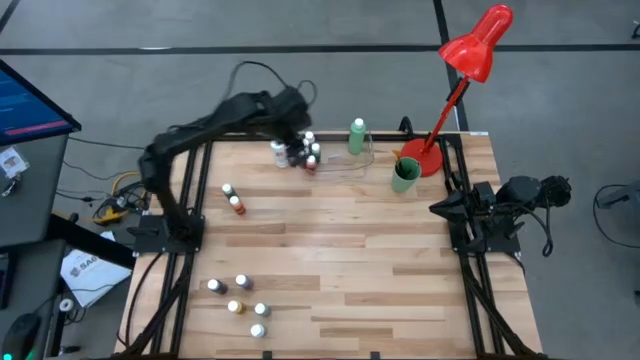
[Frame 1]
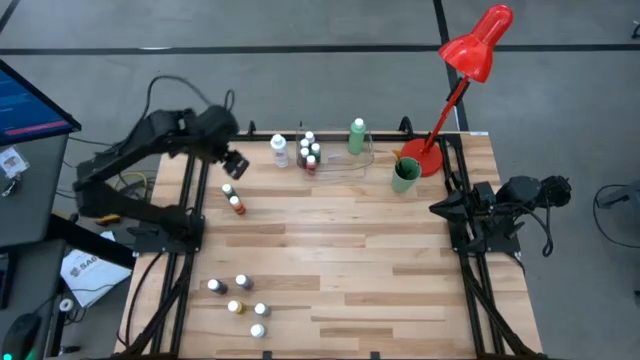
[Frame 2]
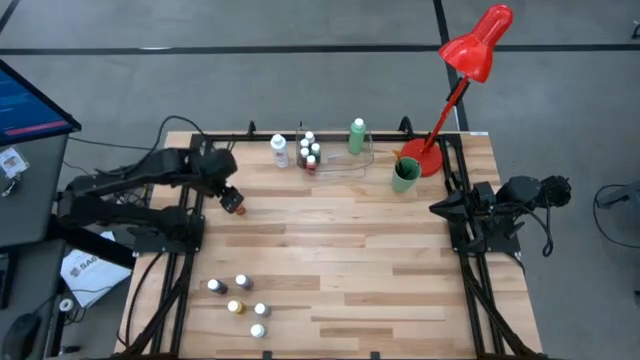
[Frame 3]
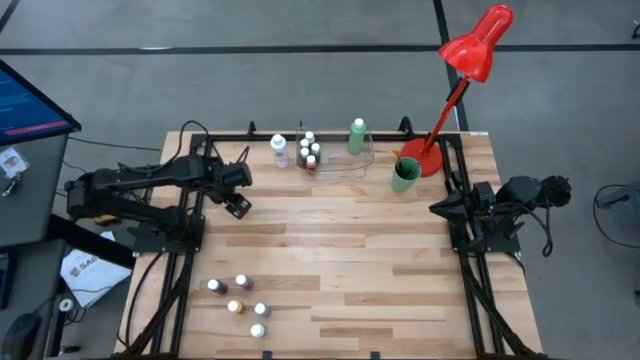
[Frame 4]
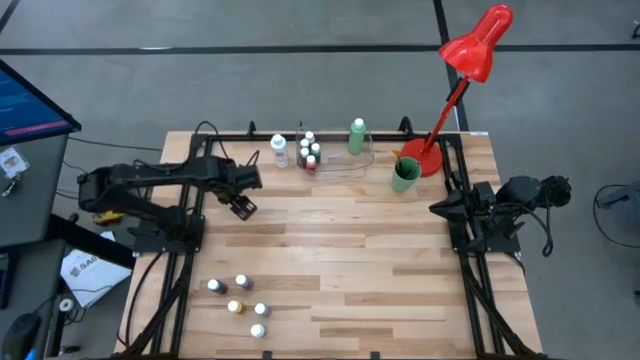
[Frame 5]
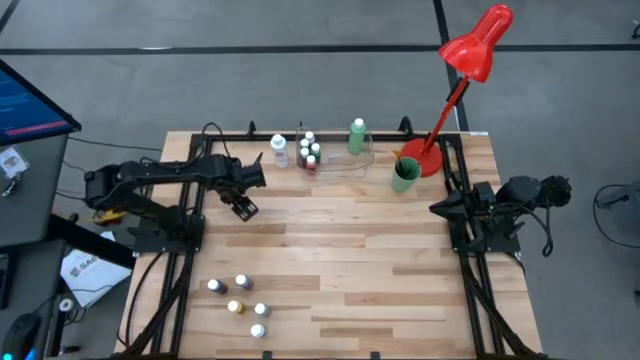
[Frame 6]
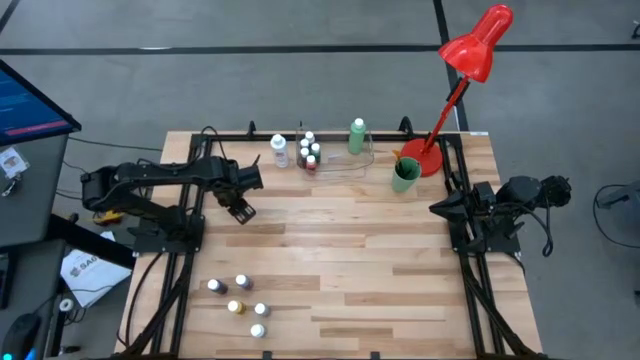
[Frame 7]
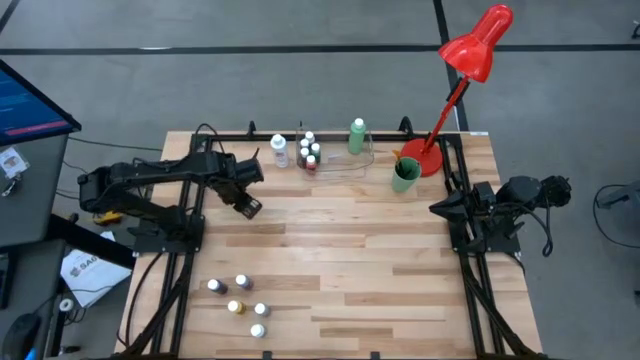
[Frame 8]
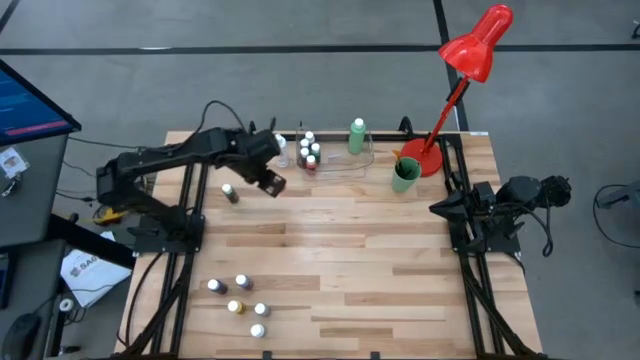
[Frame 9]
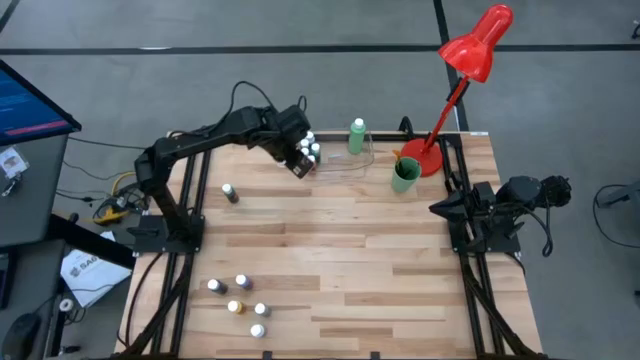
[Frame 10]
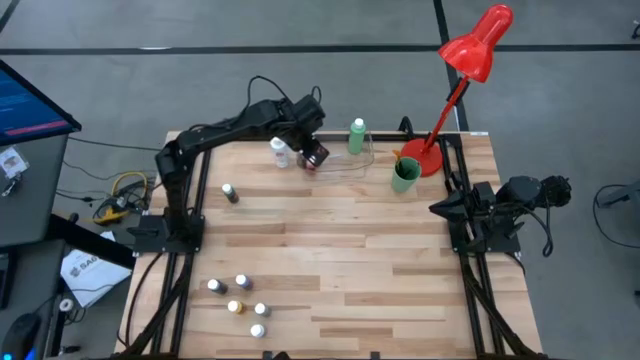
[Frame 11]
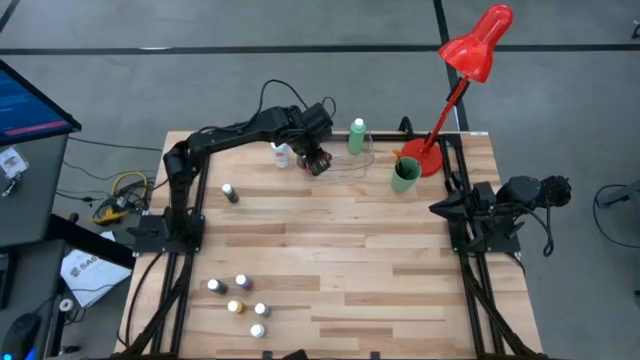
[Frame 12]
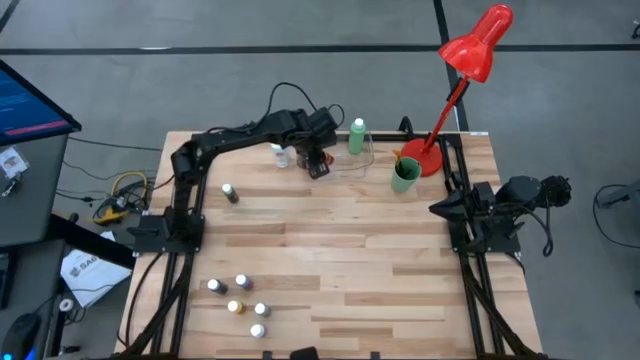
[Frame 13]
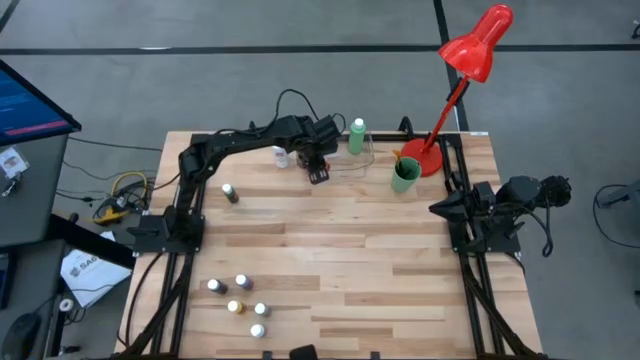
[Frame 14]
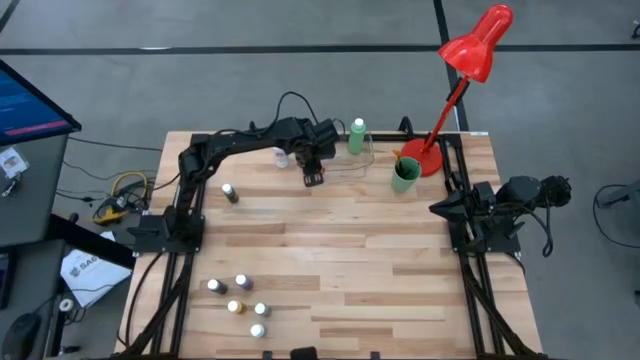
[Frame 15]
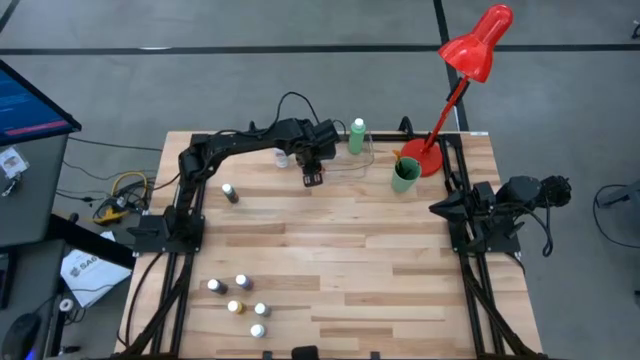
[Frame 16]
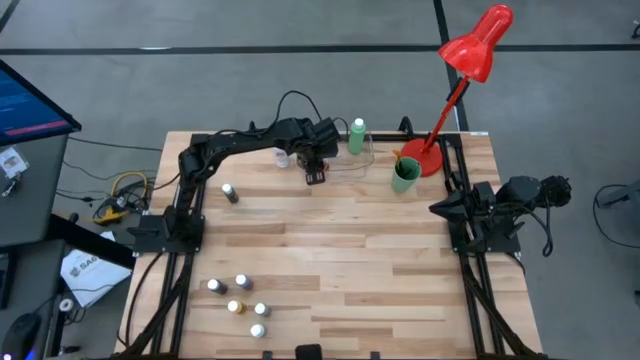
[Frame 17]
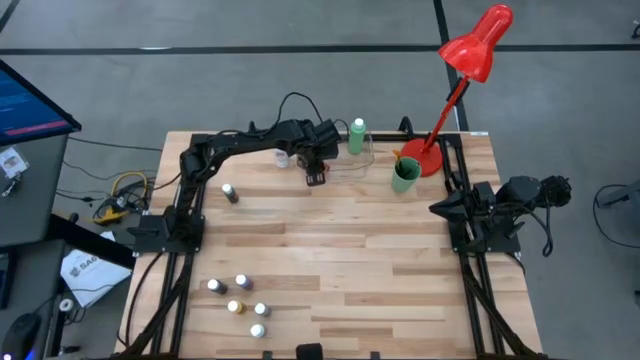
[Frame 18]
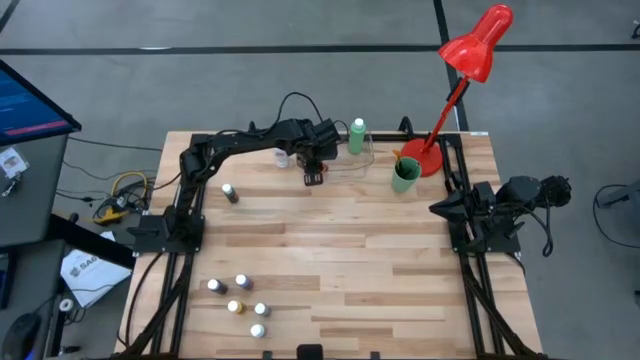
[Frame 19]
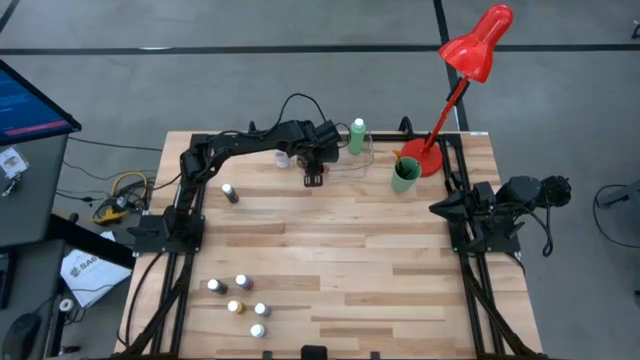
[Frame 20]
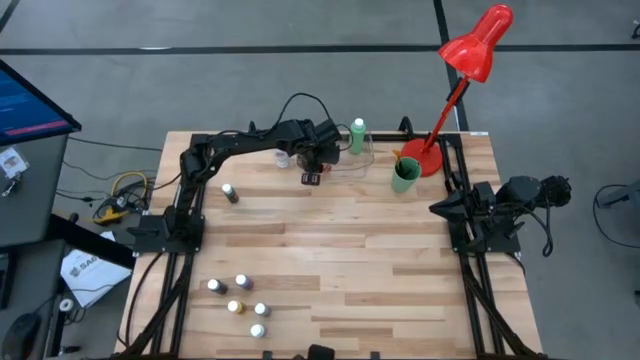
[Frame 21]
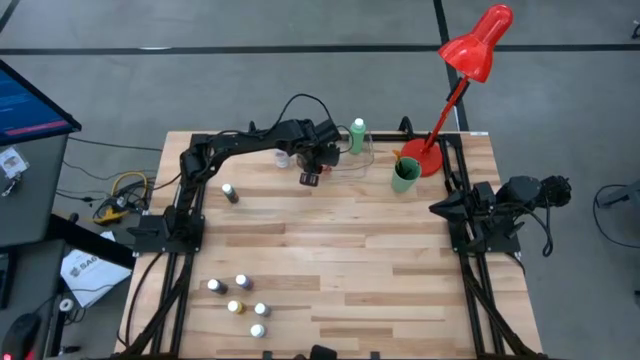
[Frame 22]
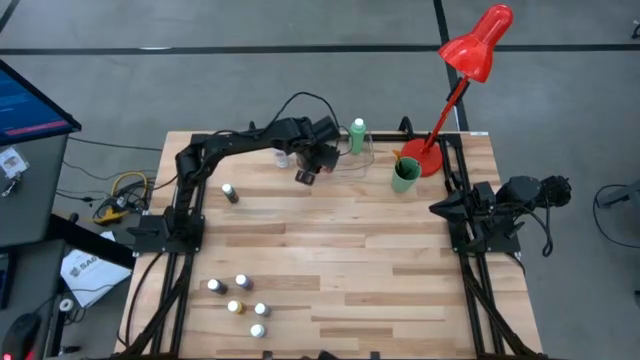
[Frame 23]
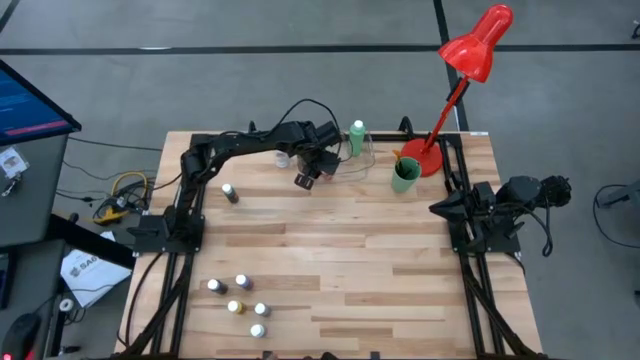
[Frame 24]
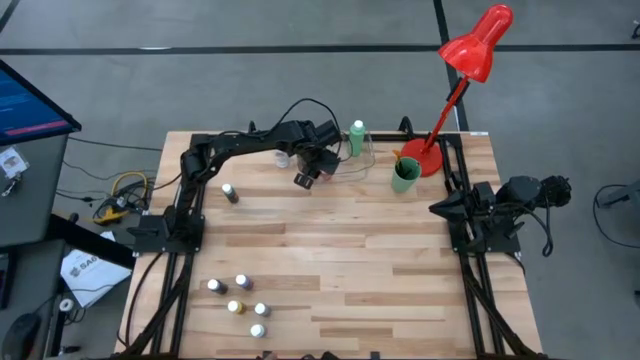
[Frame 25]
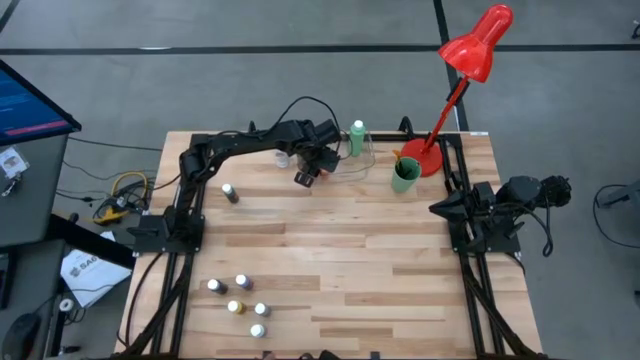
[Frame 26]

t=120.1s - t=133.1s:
Task: Pick & Place Paint Supplies
Put the small orange paint bottle into the transparent bin

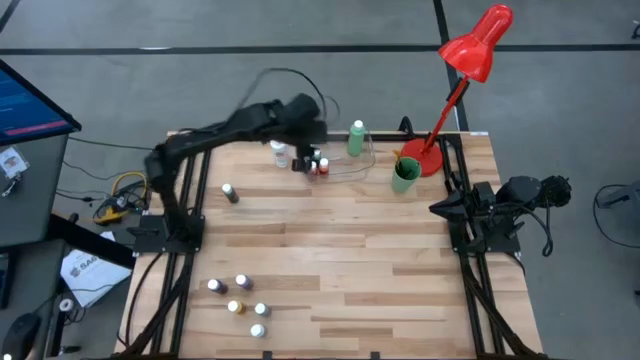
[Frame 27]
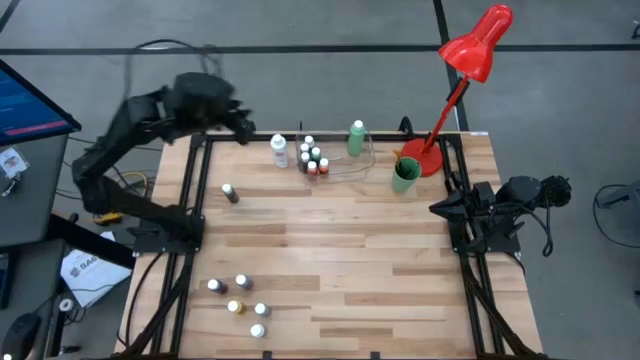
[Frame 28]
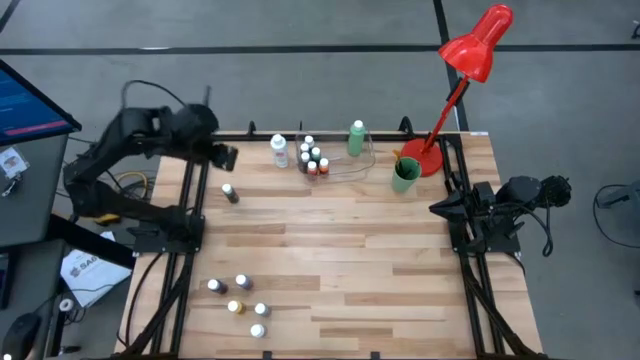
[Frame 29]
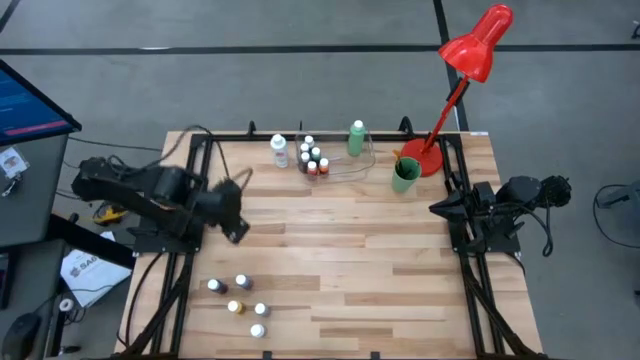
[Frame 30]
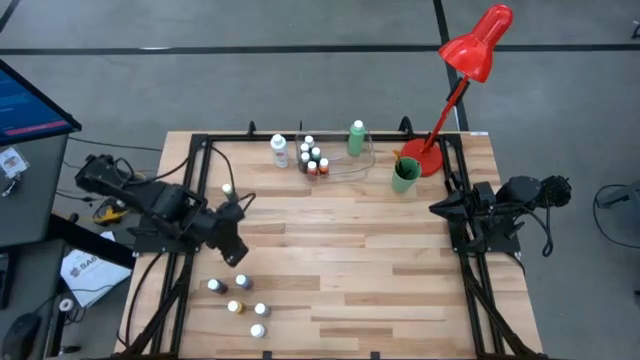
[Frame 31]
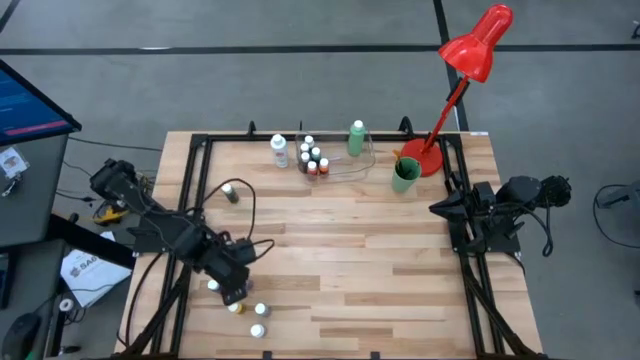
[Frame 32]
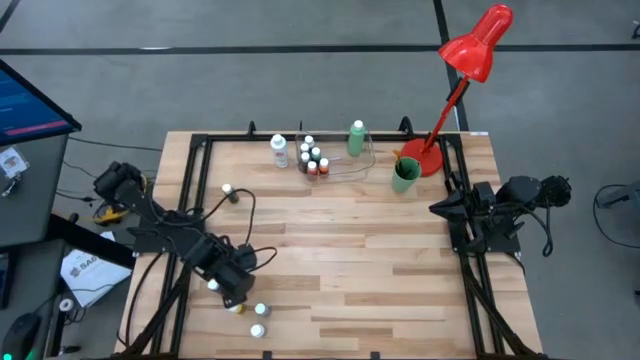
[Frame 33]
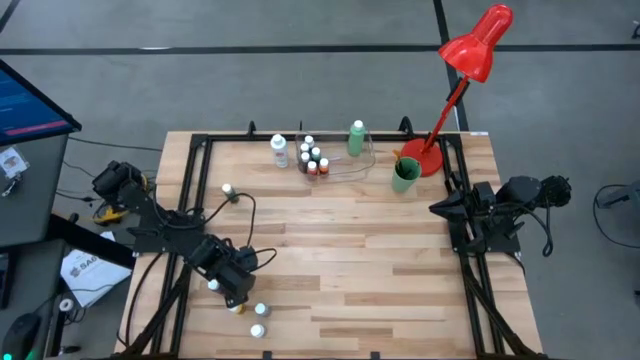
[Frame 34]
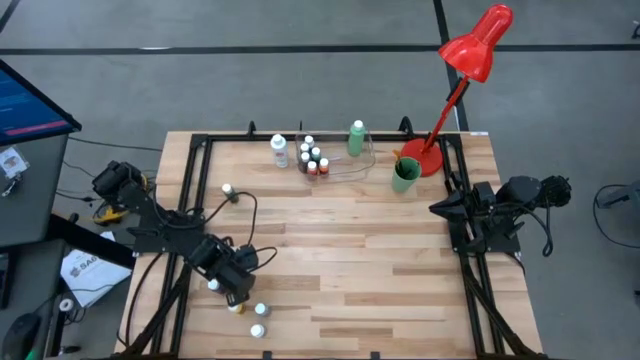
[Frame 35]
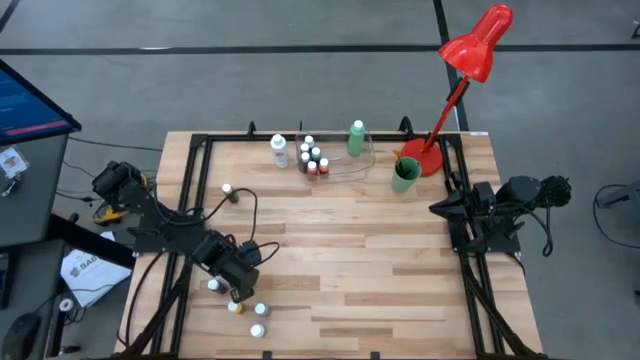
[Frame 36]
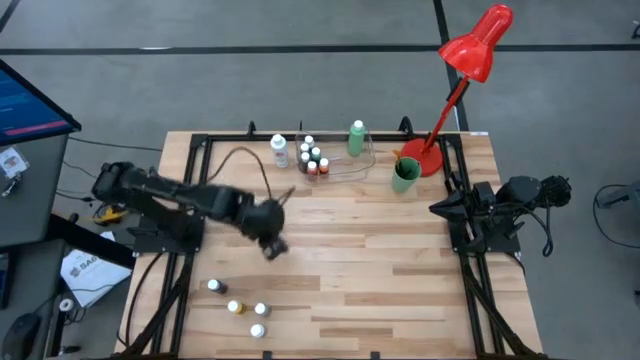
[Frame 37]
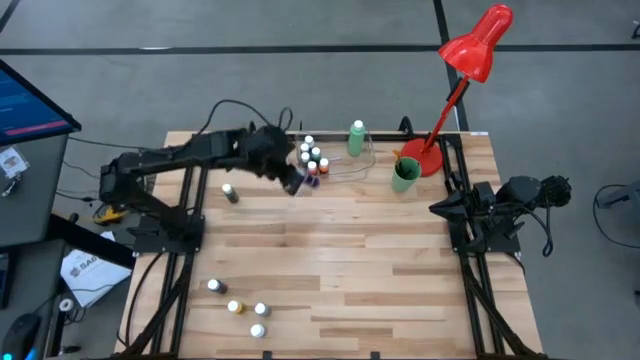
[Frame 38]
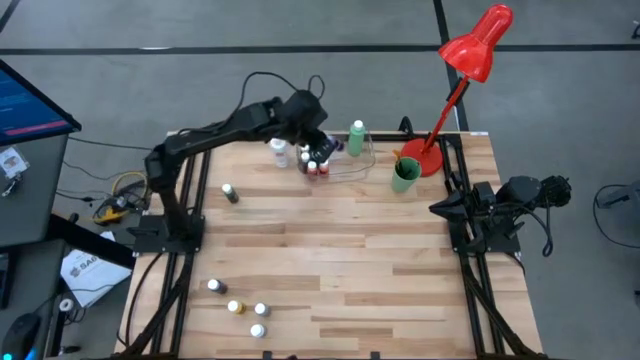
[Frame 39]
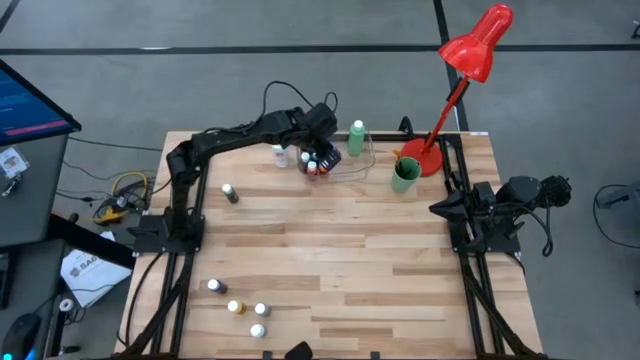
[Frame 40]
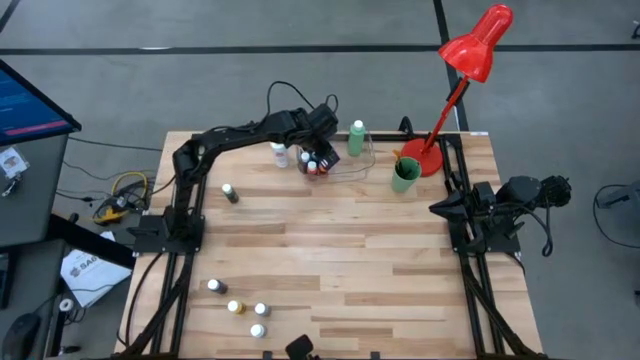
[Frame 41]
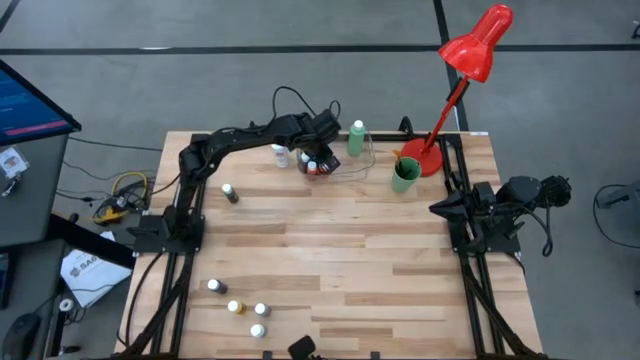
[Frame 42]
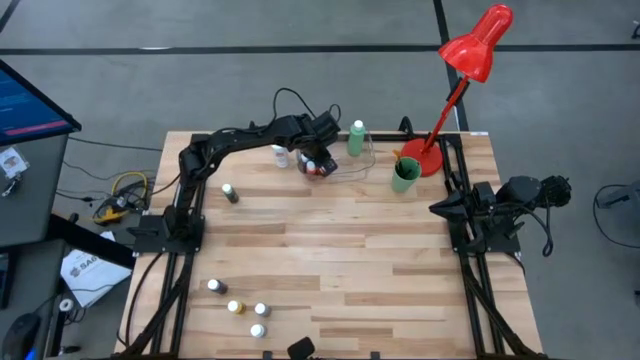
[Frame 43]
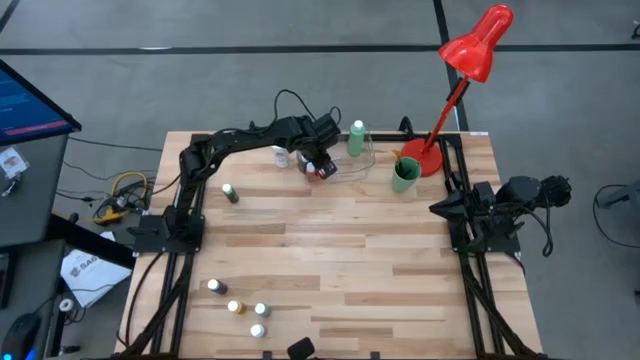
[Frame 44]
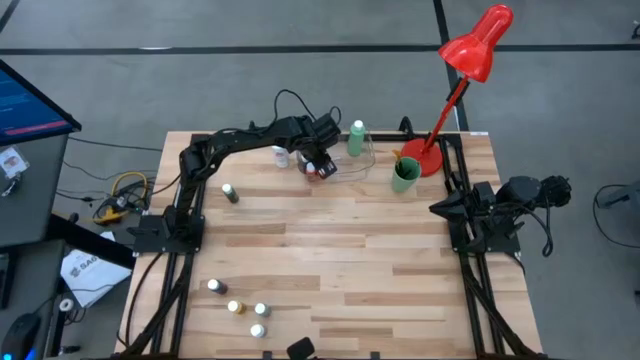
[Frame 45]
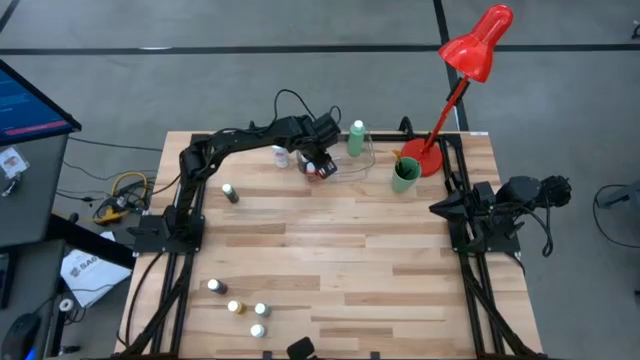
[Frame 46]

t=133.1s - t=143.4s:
Put the small purple paint bottle into the transparent bin
